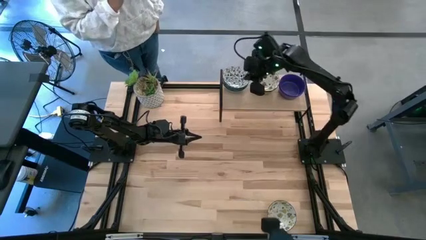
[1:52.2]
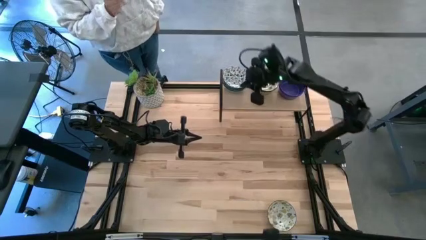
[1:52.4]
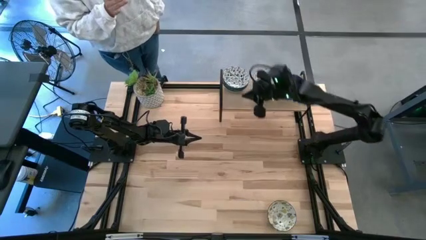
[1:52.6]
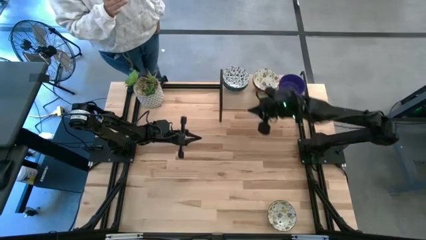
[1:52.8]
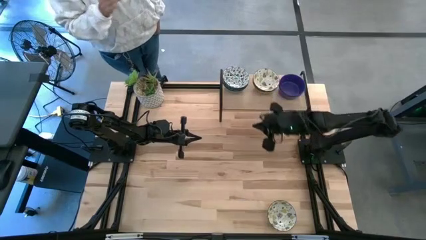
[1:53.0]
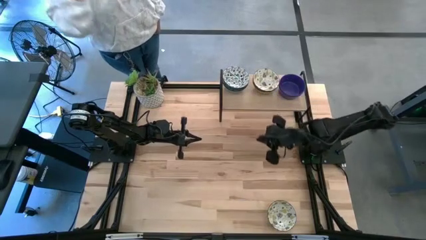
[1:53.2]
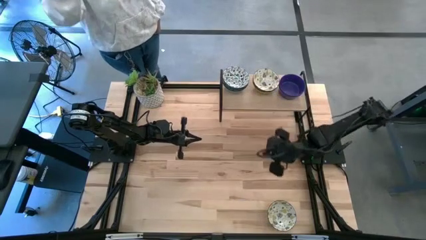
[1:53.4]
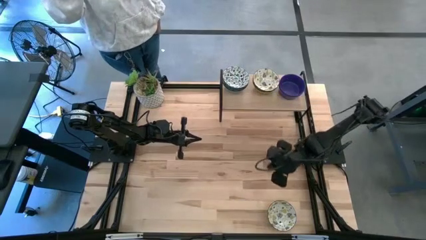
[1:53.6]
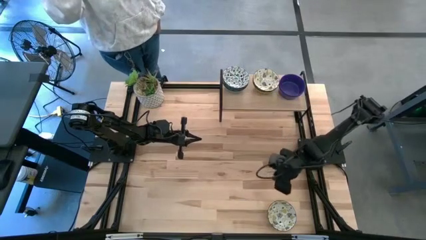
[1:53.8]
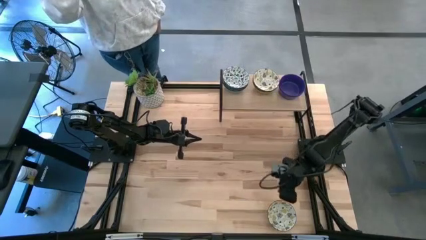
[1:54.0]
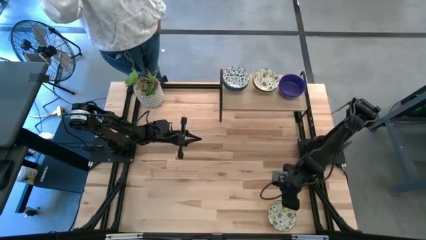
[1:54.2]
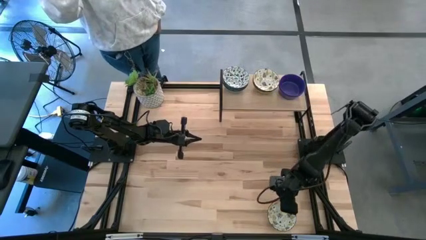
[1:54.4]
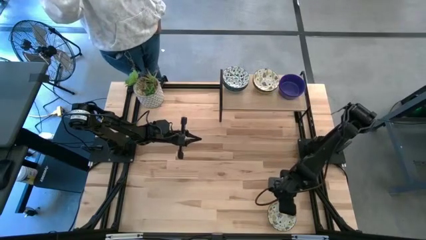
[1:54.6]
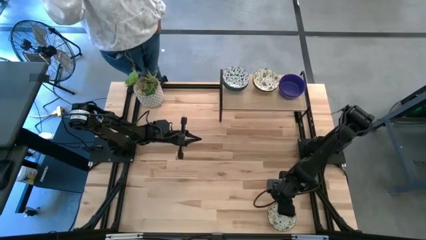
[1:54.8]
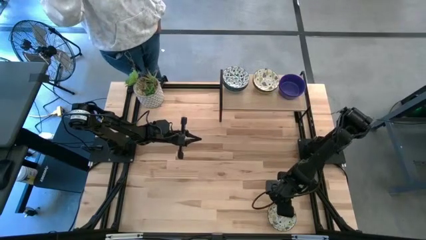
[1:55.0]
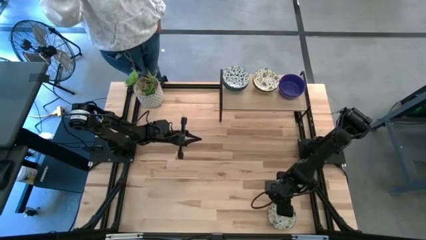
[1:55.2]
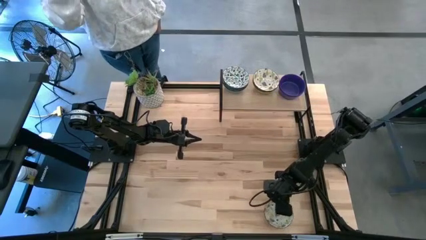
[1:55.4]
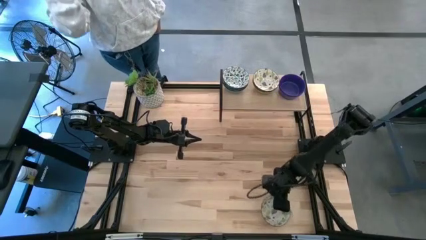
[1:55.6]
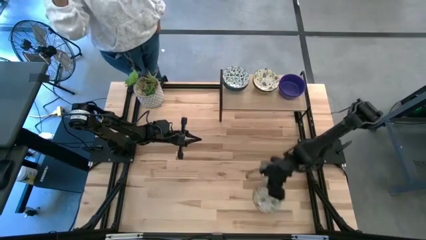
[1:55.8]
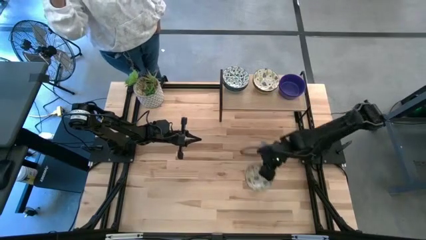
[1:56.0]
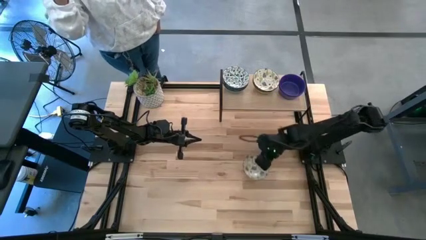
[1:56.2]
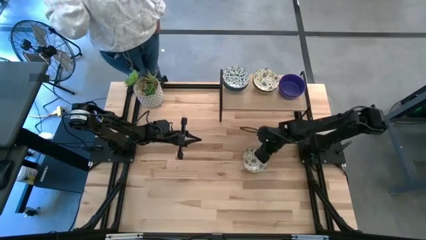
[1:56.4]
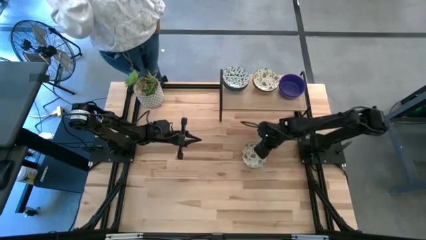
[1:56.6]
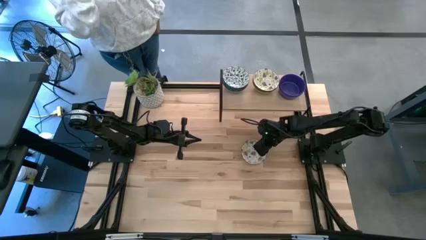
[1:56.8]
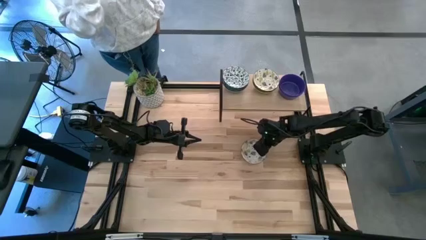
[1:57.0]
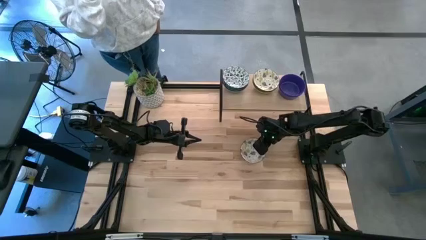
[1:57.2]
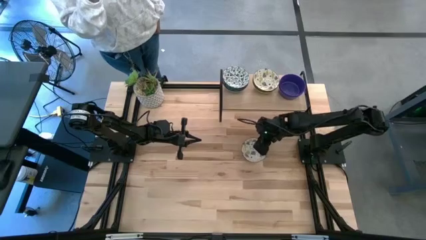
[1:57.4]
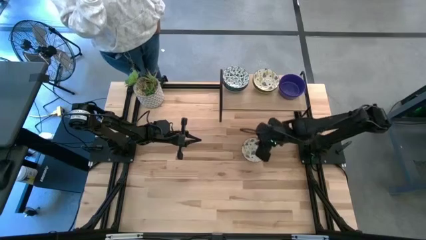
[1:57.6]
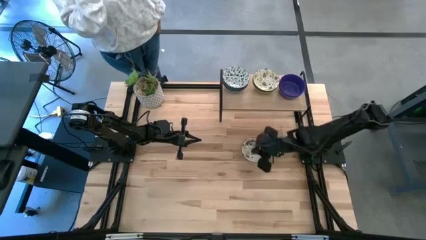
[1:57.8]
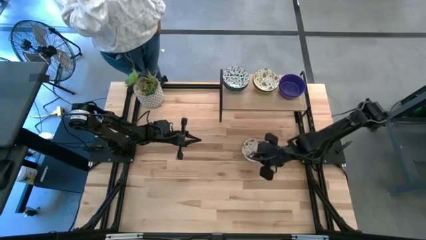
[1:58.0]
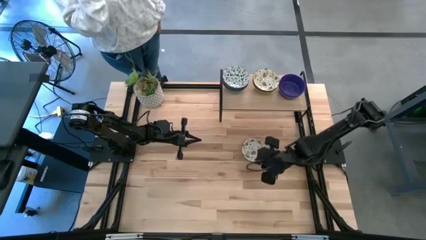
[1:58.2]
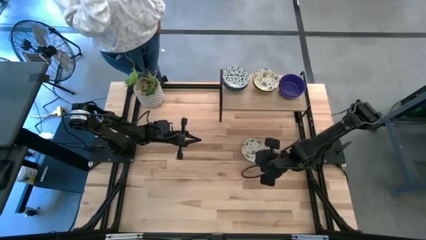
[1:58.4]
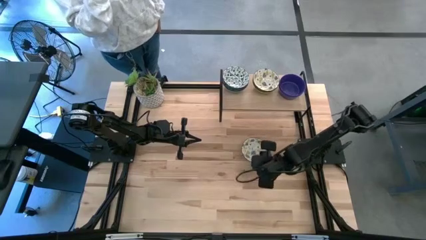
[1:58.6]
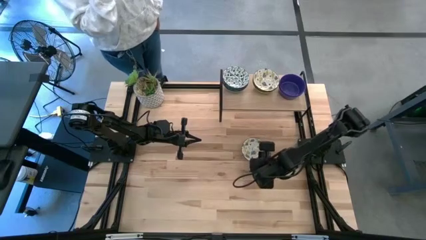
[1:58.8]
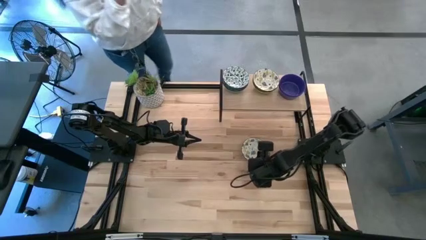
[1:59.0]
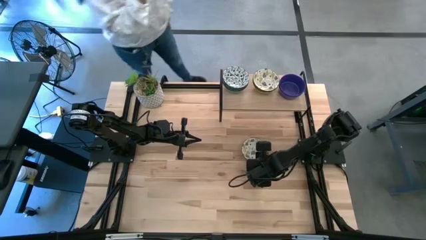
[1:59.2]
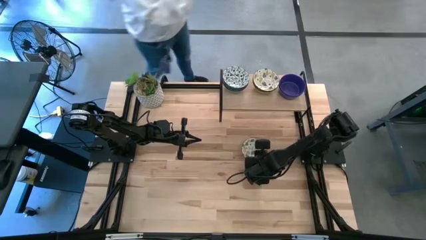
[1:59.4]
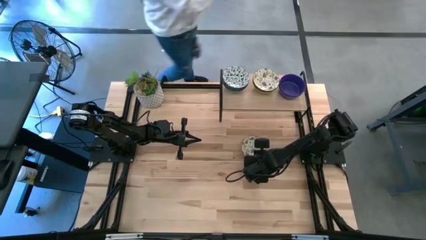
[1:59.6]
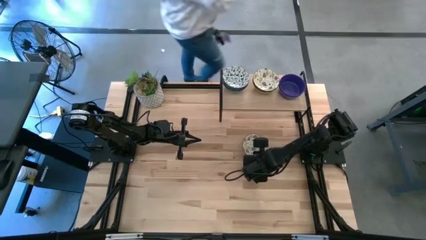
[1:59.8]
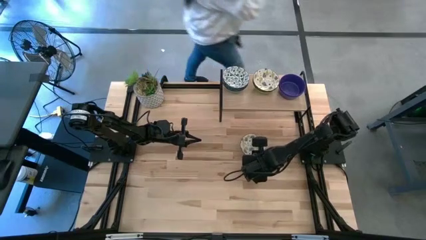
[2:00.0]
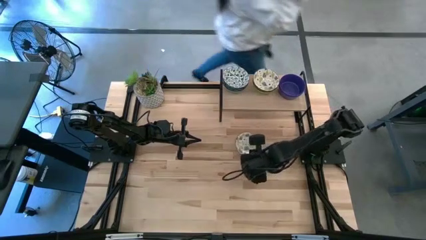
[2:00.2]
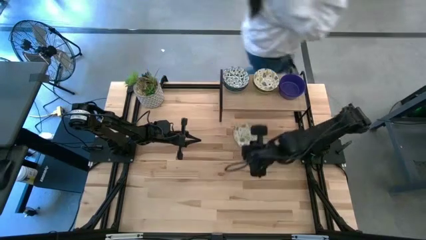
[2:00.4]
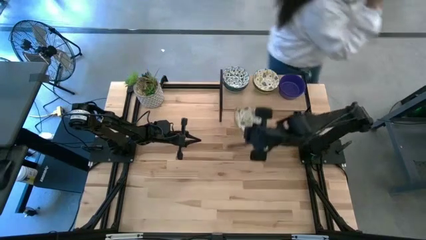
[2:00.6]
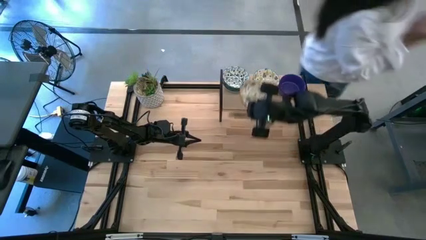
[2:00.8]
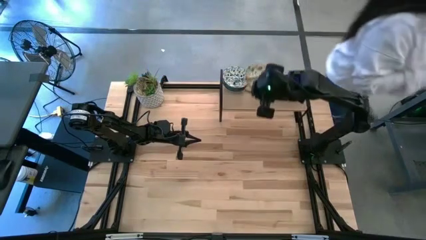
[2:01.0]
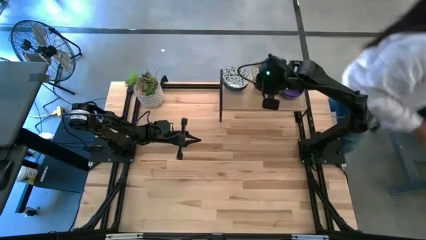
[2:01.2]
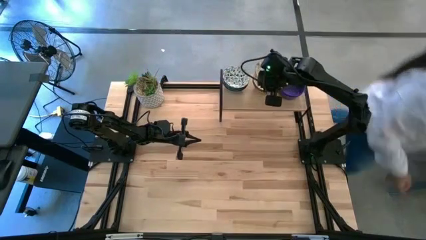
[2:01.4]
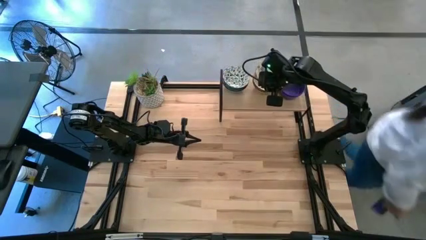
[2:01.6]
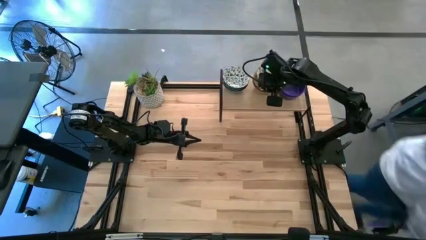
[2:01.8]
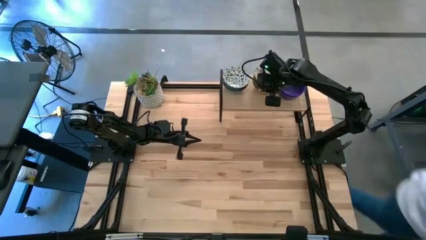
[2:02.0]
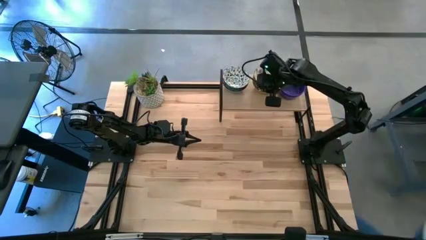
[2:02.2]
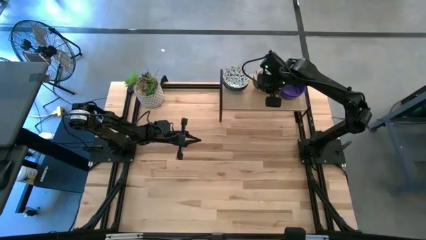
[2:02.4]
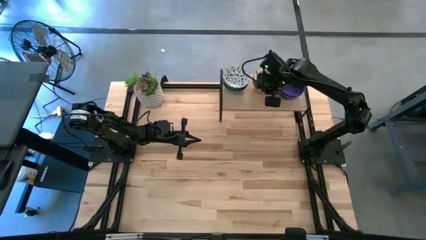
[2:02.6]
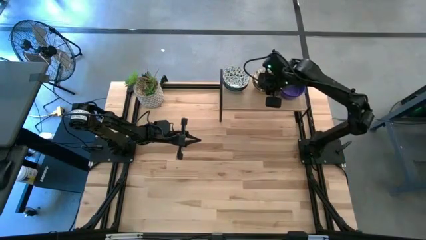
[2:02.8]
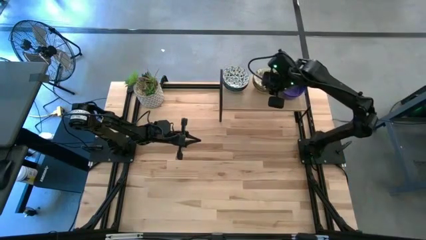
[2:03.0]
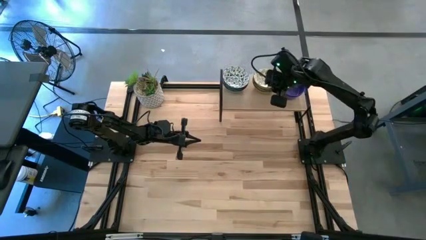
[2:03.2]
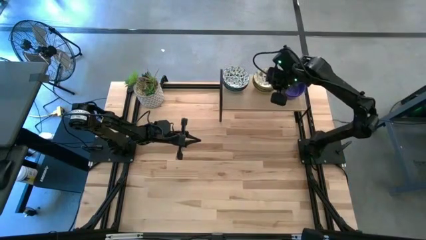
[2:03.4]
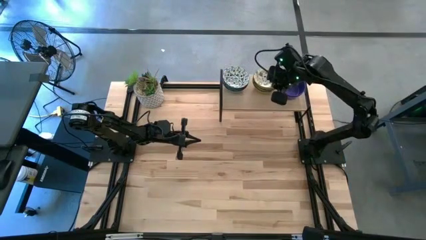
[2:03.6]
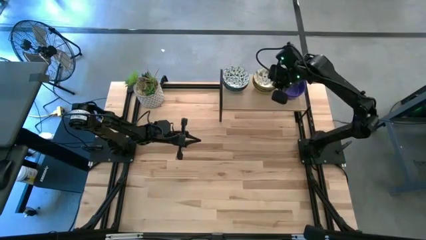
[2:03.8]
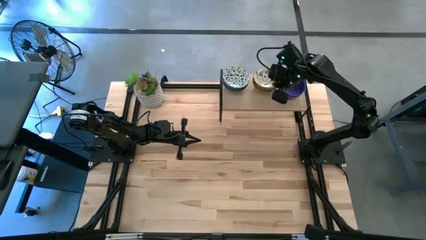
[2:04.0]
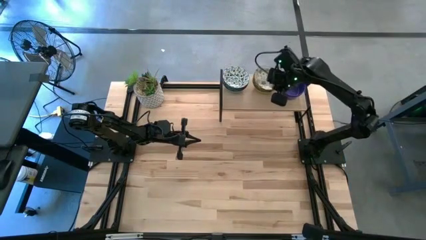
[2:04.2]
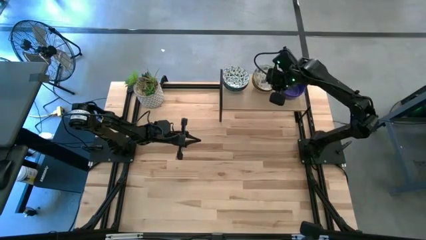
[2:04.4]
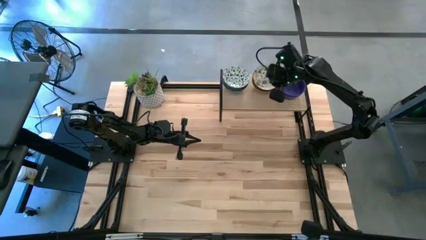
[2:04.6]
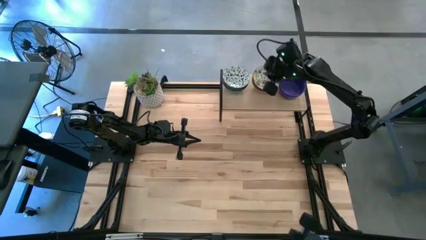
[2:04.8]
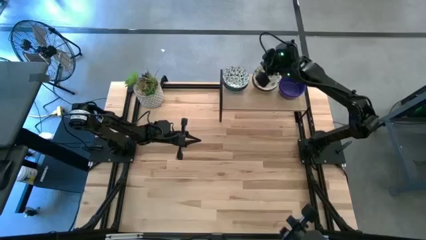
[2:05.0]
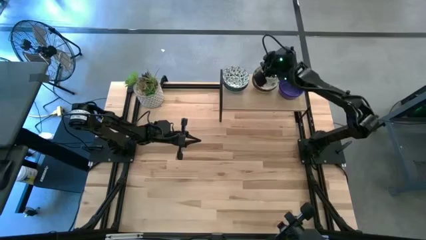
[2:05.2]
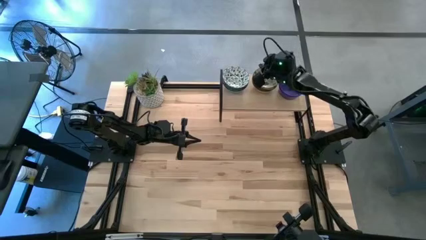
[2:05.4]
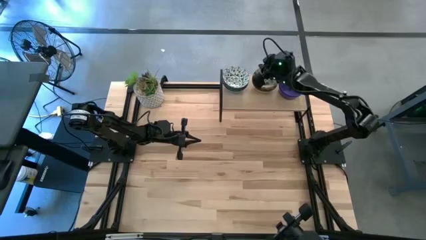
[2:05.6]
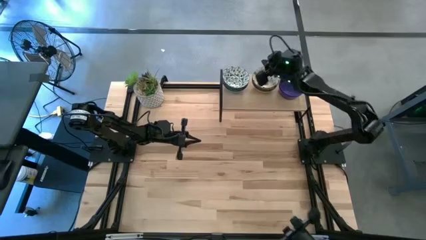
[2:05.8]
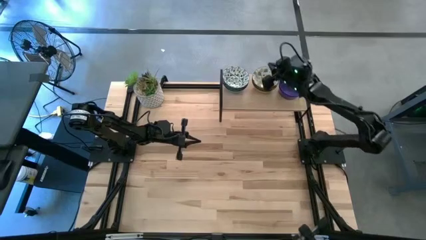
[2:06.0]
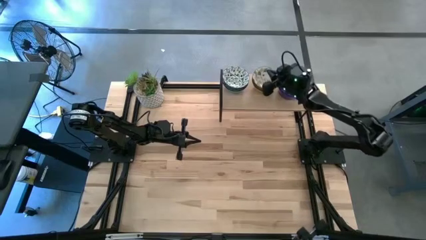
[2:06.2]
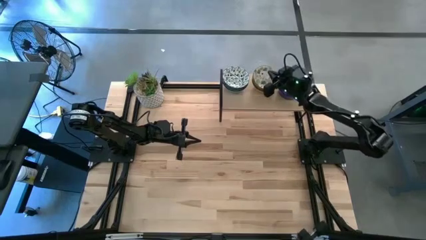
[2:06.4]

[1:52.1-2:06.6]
Task: Pick & Place Mini bowls
Stack the white patterned bowl on the white patterned bowls on the shelf

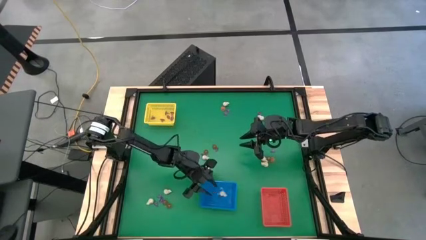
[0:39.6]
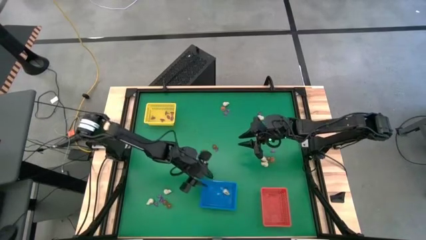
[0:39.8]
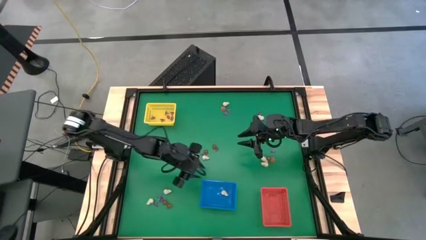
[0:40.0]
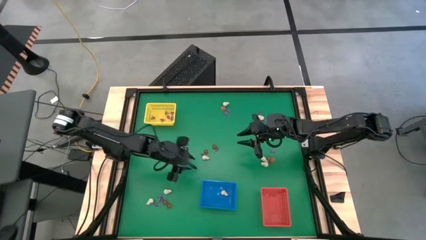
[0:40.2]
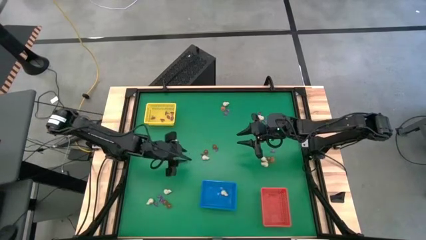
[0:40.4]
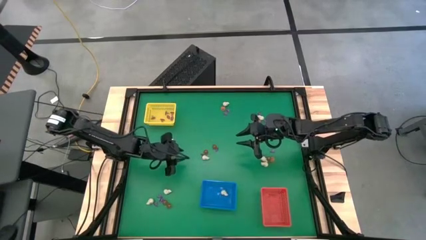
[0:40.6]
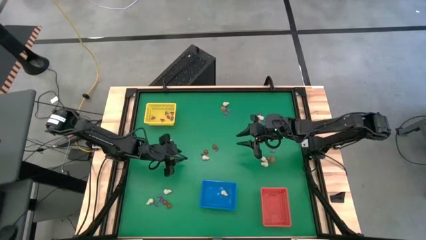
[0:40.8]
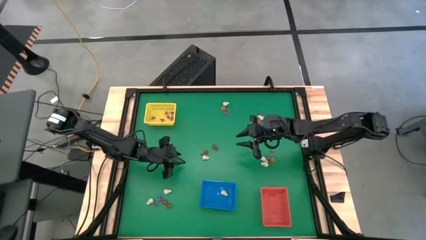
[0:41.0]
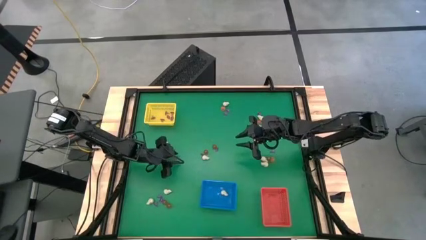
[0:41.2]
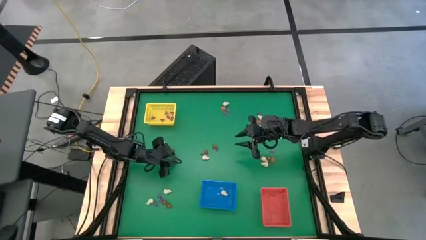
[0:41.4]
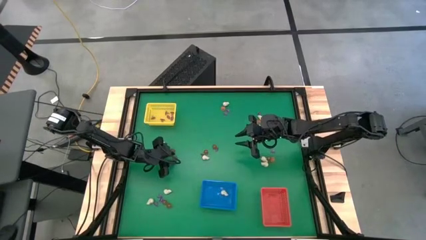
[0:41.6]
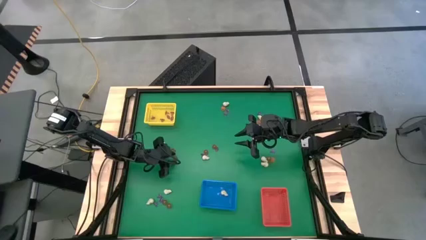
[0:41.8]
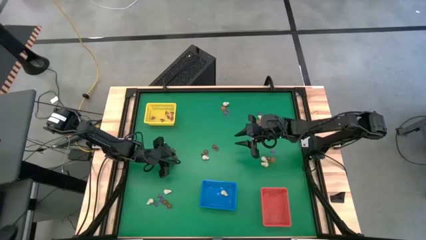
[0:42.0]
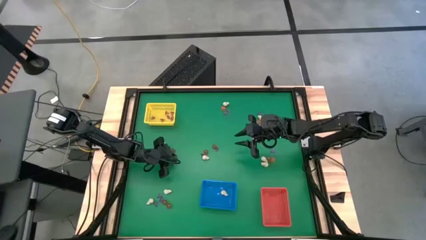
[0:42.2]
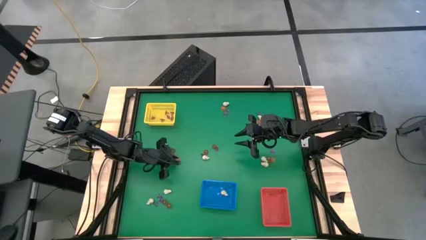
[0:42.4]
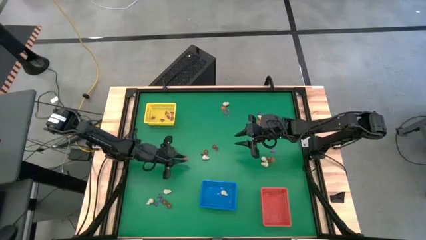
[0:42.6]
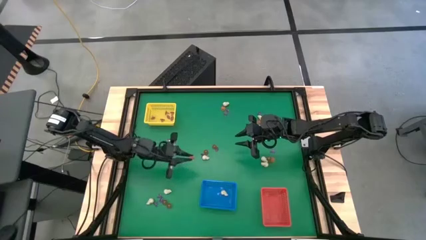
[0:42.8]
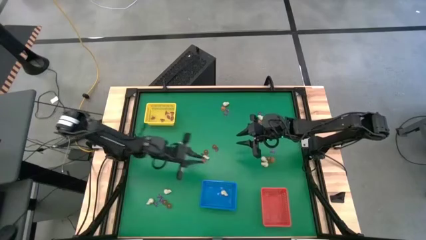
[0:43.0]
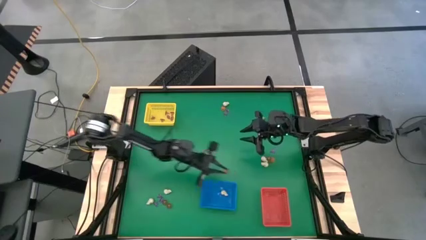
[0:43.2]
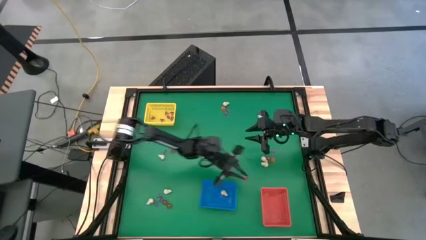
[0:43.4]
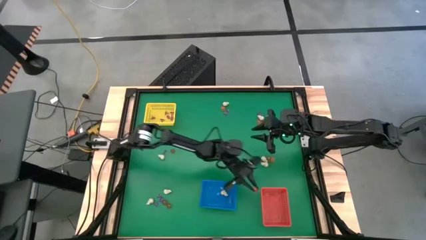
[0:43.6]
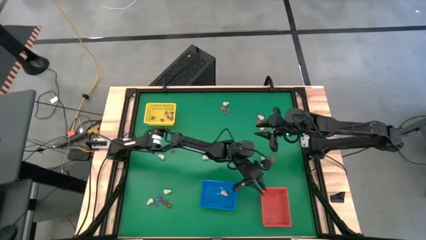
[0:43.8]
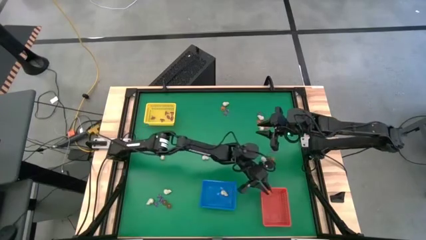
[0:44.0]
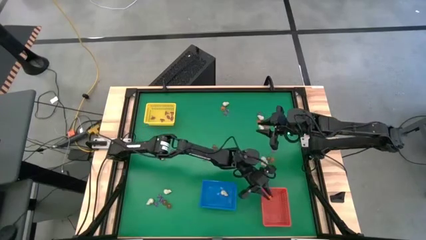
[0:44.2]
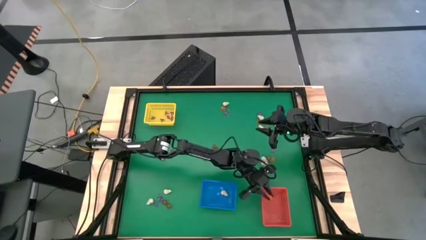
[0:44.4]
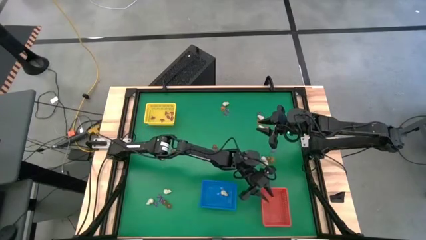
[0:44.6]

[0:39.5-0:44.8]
Task: Sort Halloween decoration
Put the orange pumpkin toy into the orange basket
